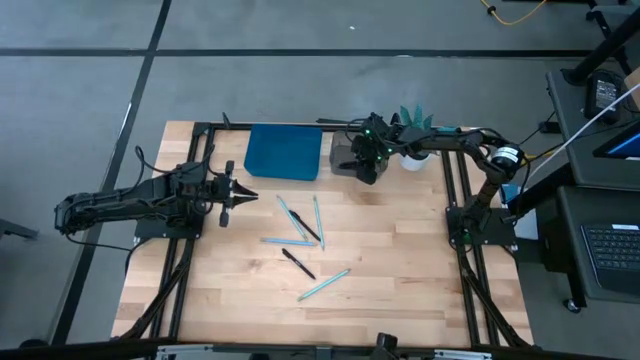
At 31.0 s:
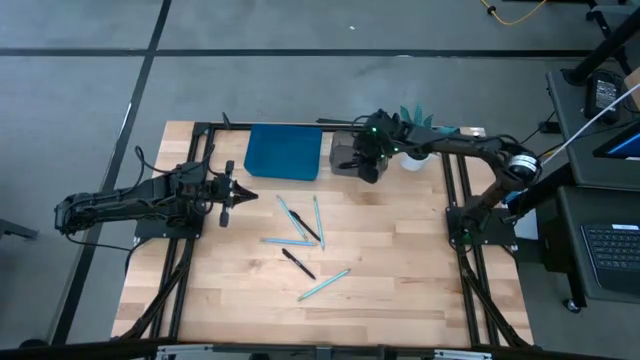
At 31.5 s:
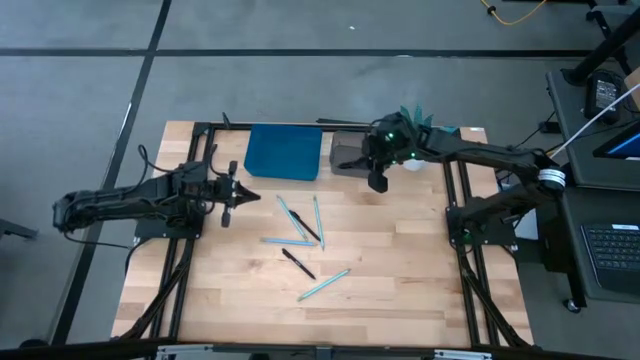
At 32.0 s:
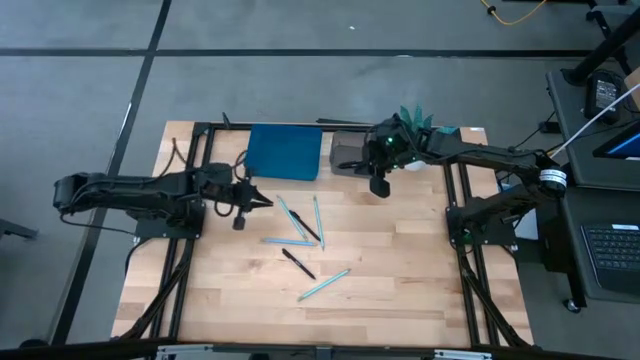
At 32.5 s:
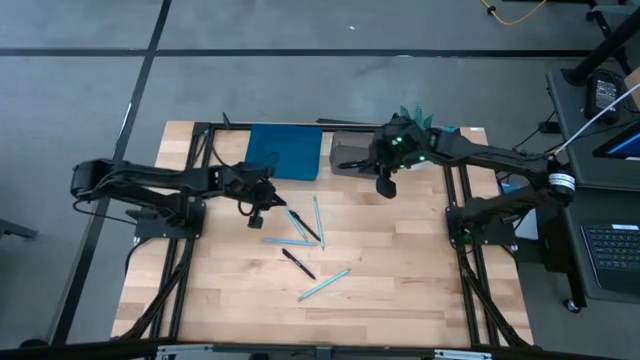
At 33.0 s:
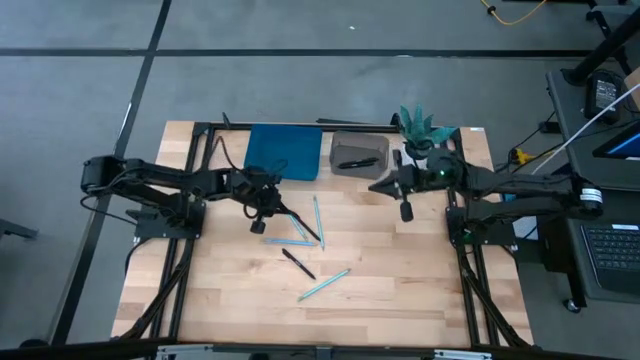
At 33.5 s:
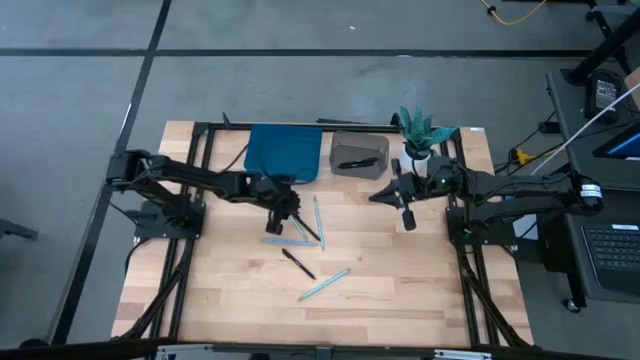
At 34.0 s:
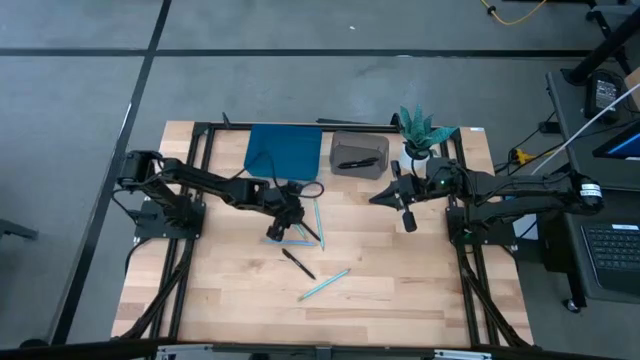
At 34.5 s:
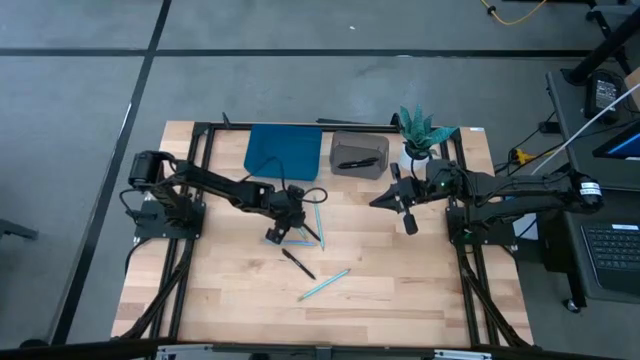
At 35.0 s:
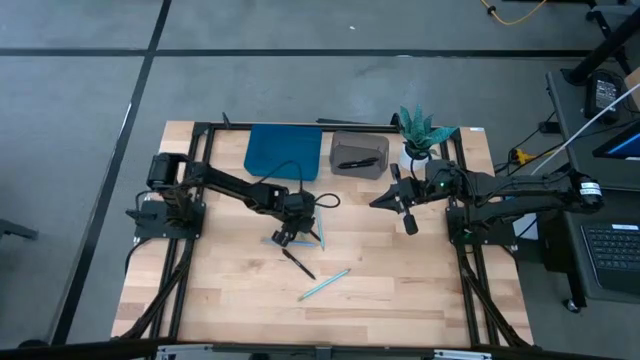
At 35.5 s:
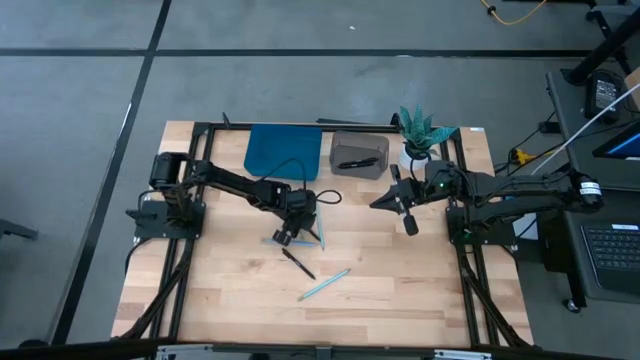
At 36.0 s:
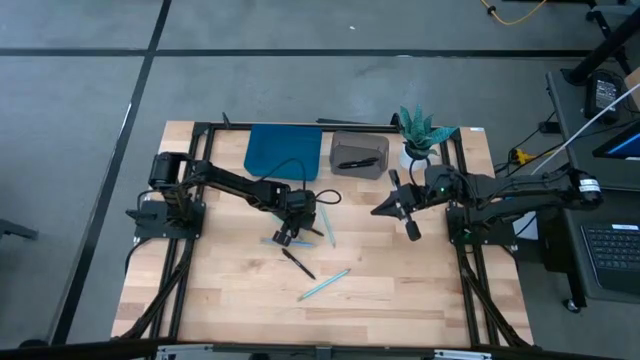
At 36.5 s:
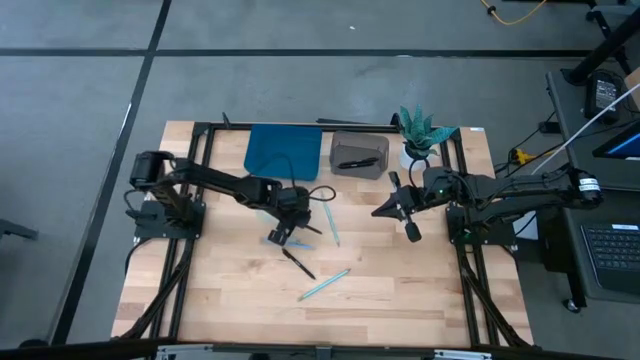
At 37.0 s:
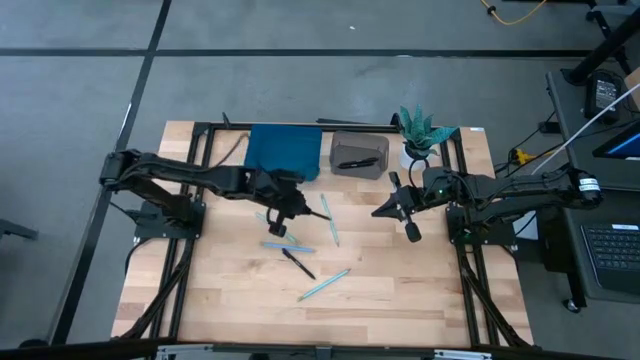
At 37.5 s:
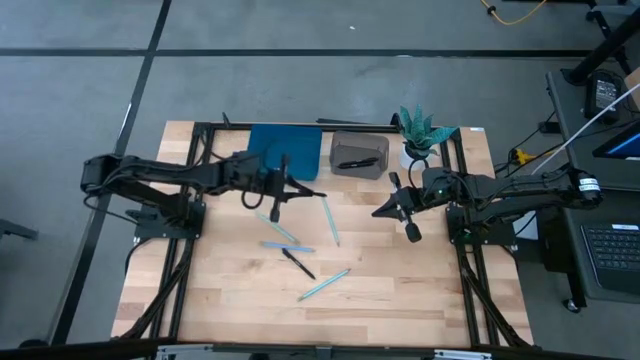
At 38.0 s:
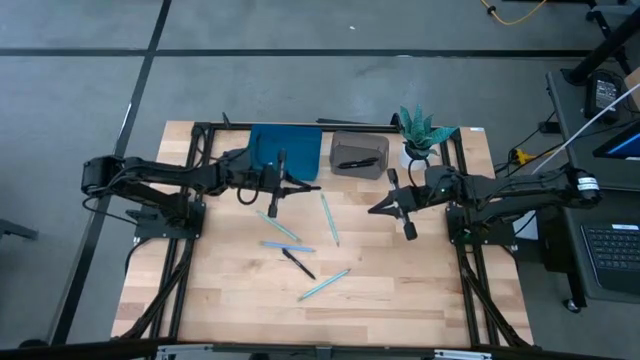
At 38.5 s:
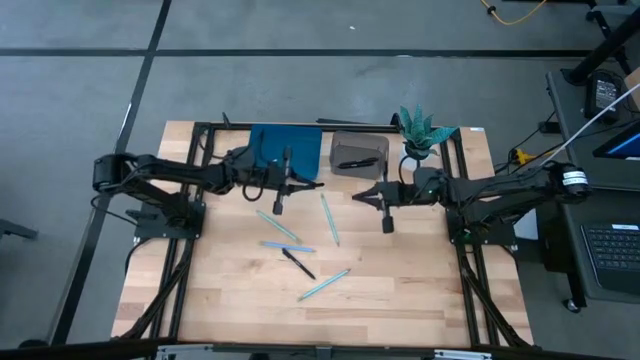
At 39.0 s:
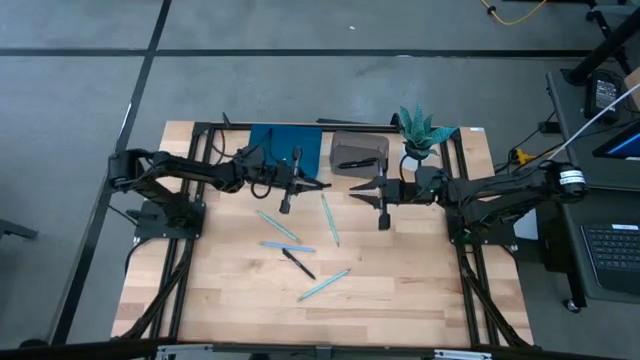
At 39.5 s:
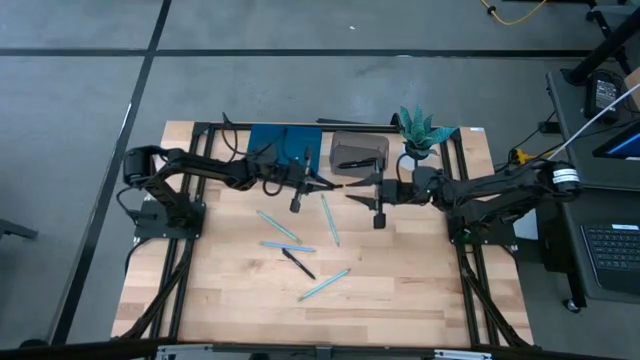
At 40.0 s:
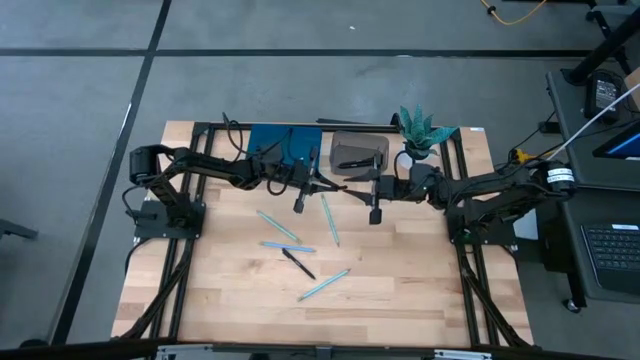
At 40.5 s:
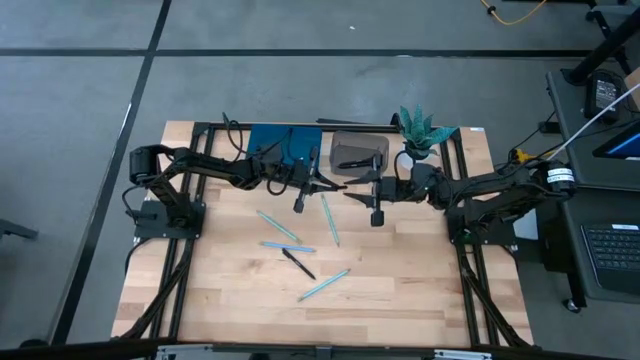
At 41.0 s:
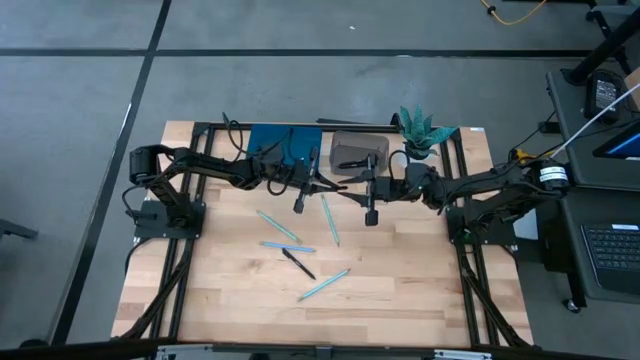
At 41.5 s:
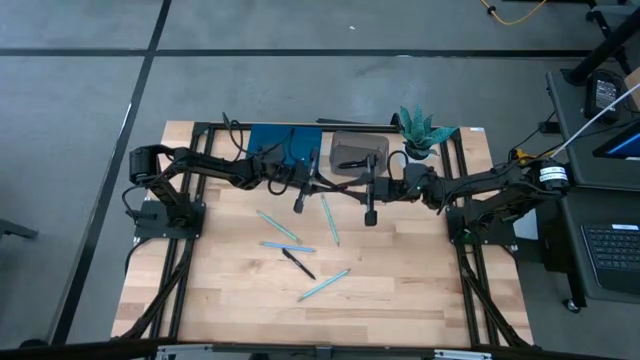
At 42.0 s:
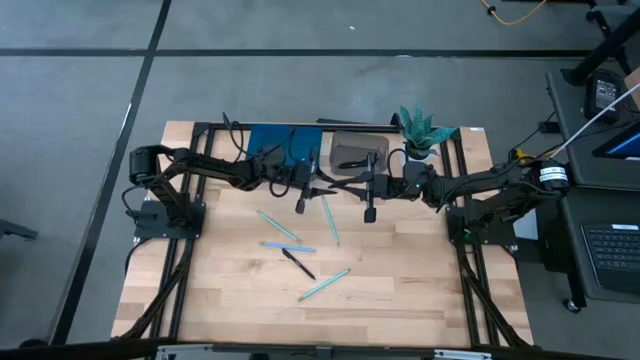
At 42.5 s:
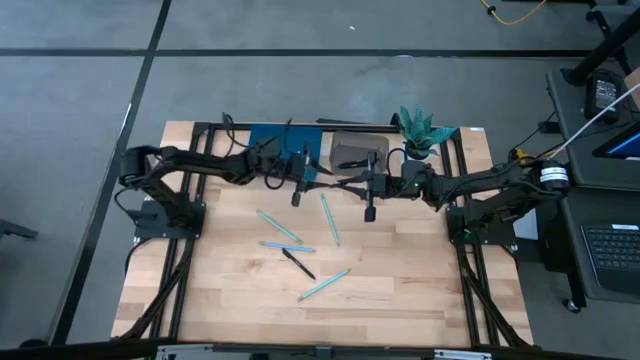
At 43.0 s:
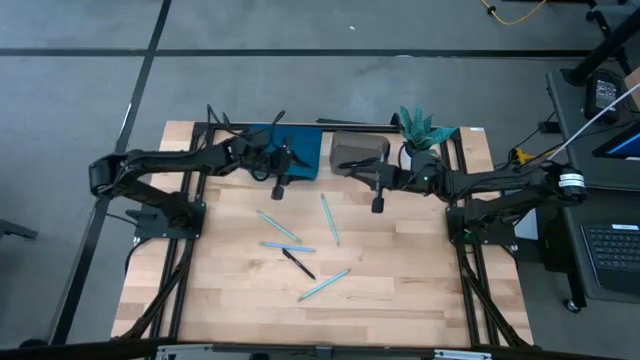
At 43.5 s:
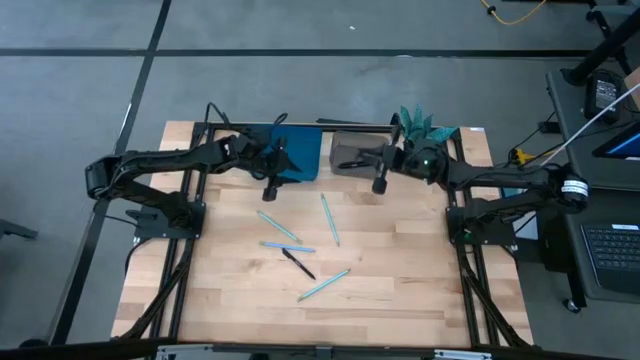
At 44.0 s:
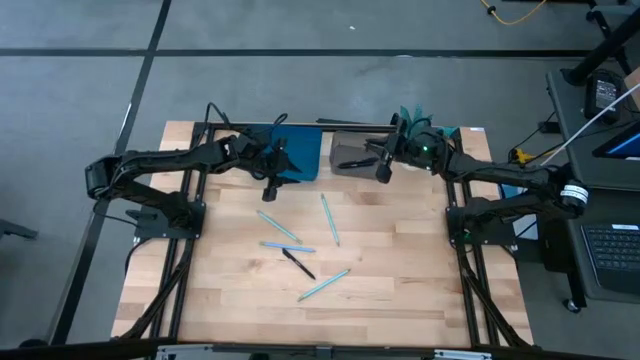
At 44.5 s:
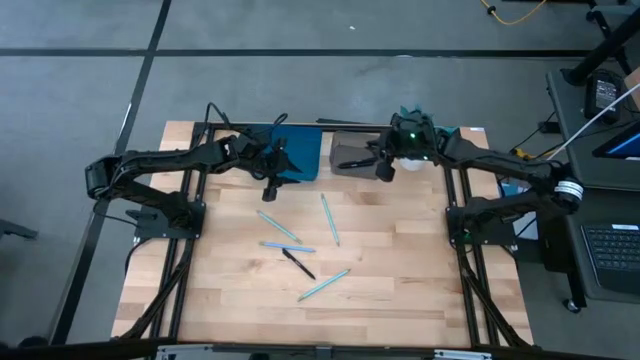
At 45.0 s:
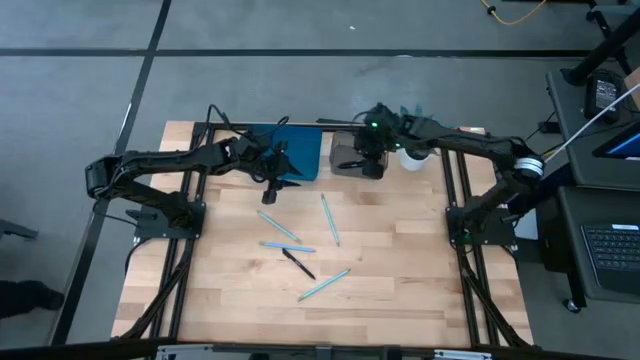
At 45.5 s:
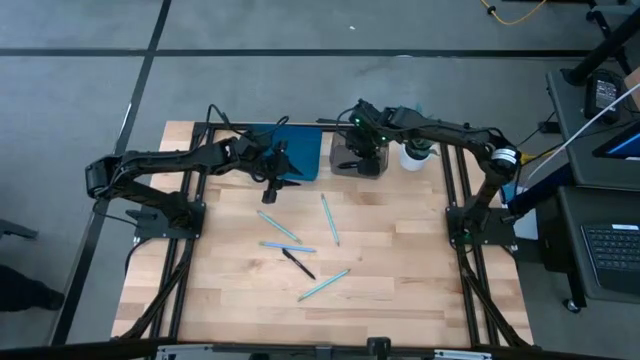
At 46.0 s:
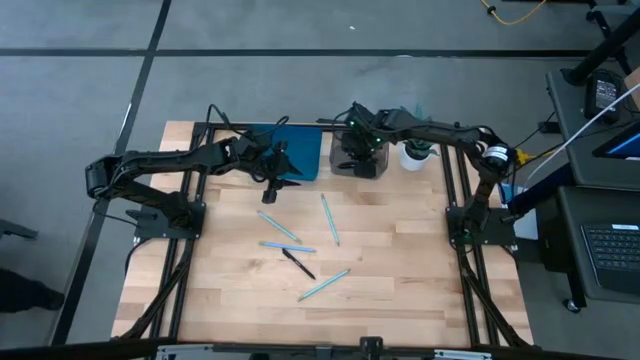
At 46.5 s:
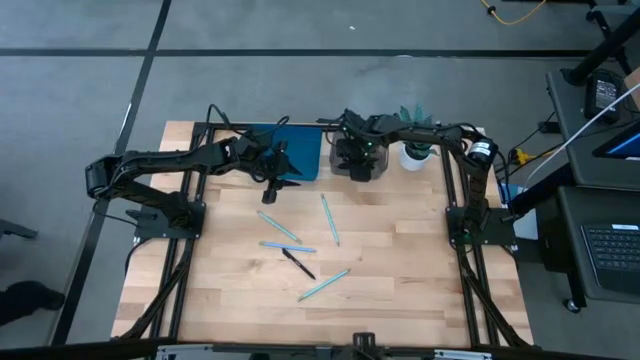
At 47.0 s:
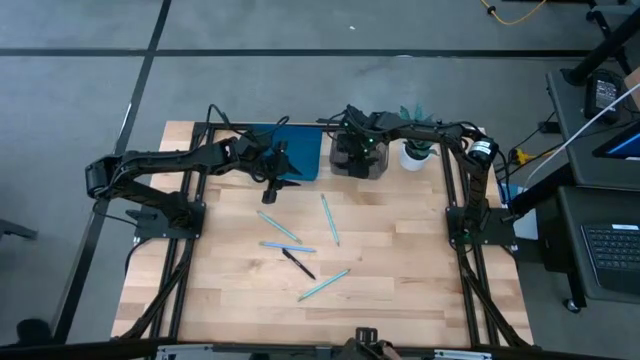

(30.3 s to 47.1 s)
Task: Sort pens & pencils
Put the black pen into the black bin

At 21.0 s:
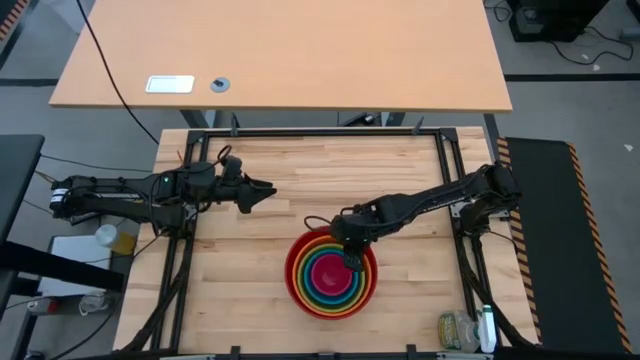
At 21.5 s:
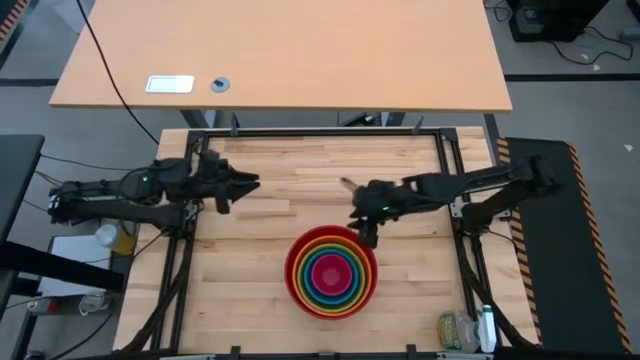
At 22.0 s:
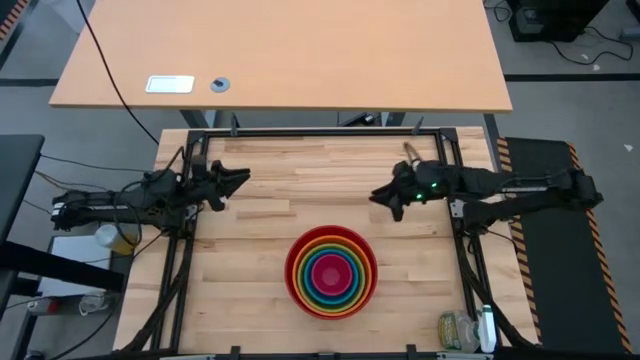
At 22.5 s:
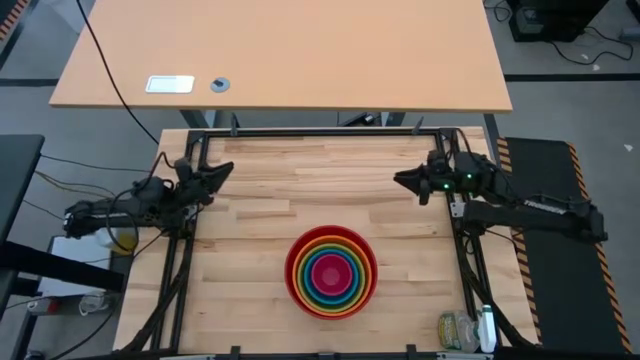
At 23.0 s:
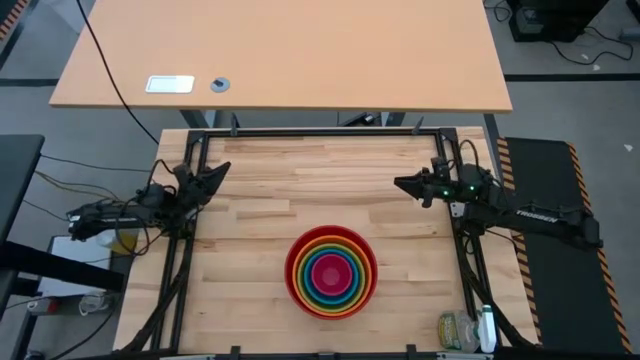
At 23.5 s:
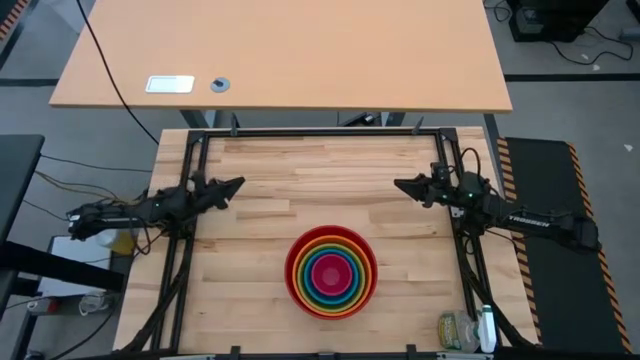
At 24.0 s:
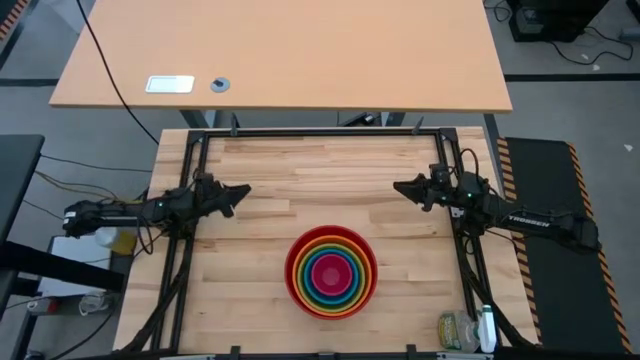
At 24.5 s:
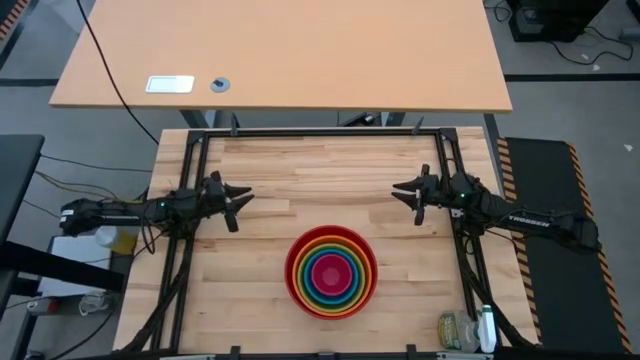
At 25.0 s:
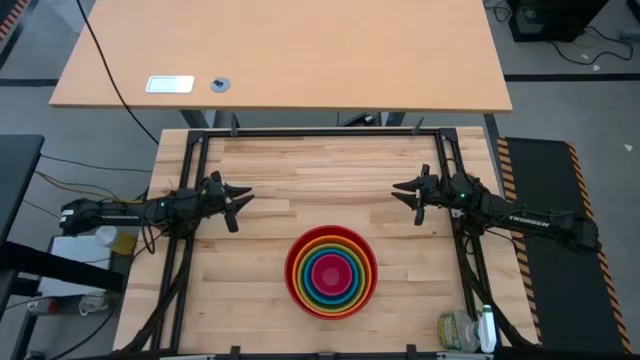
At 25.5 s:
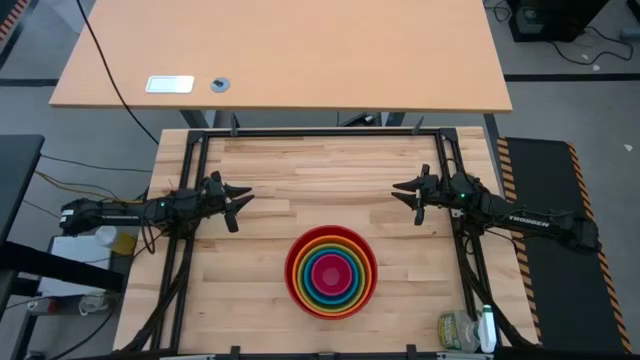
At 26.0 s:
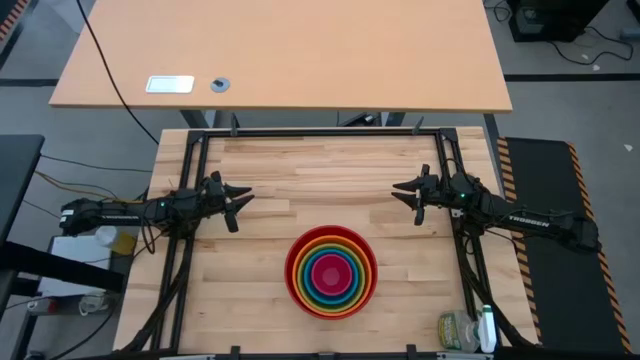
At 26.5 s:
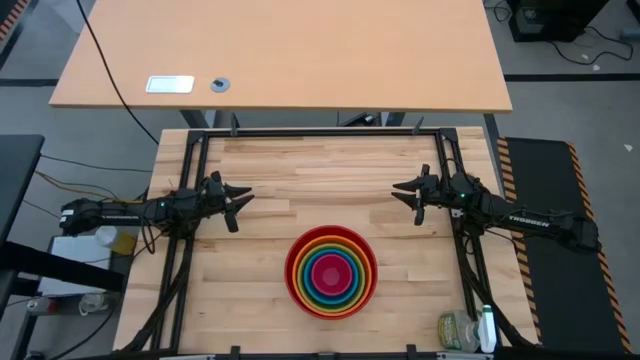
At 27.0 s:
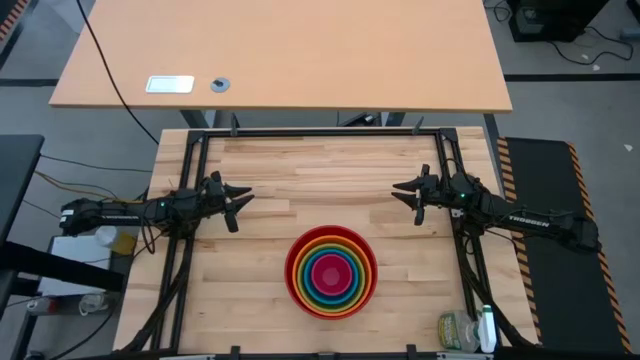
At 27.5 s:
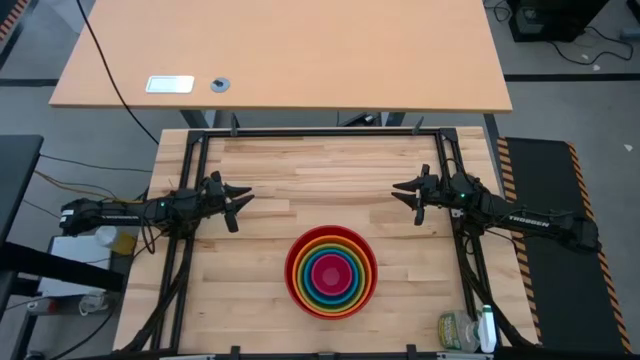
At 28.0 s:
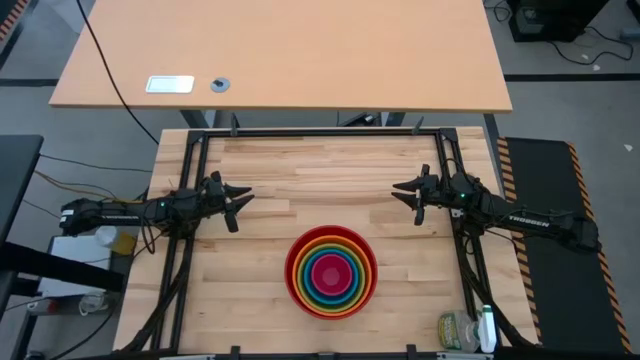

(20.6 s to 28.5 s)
Task: Nest bowls inside each other by size order
Return to Home Position
